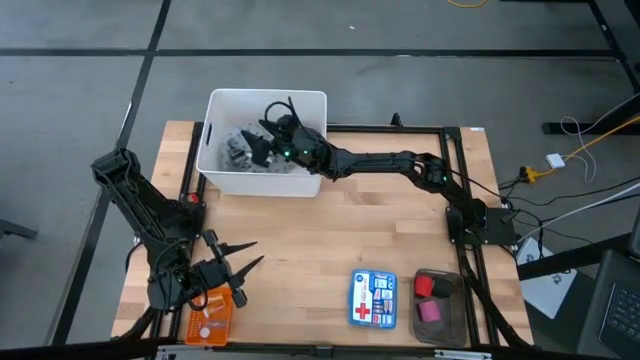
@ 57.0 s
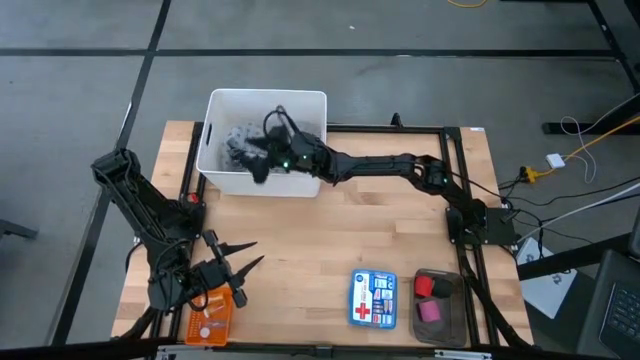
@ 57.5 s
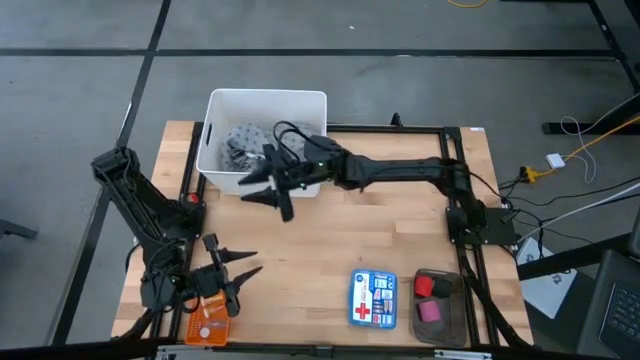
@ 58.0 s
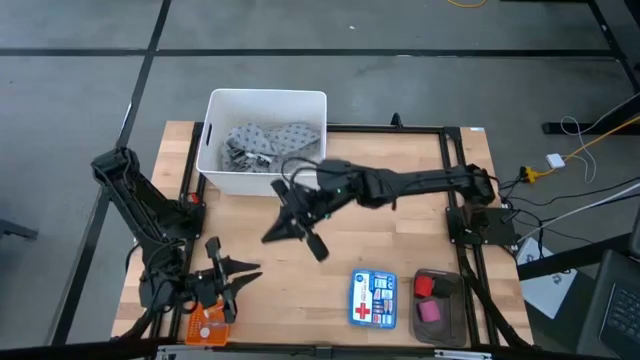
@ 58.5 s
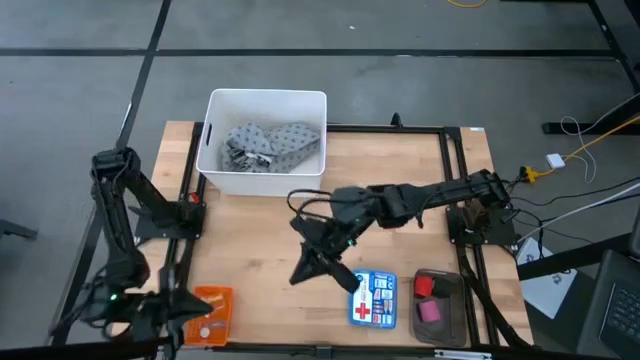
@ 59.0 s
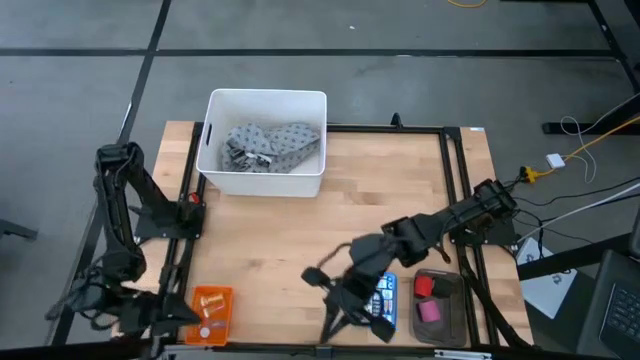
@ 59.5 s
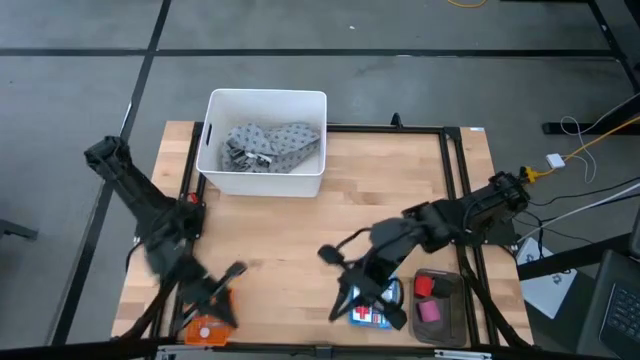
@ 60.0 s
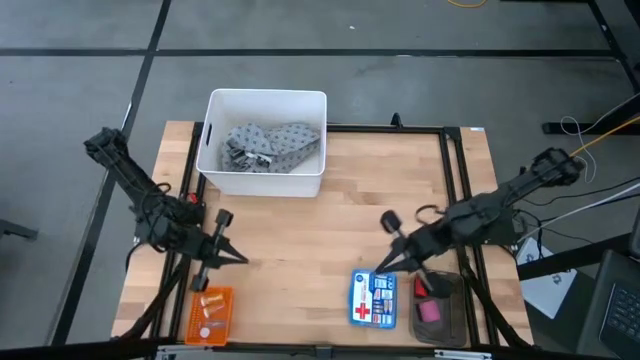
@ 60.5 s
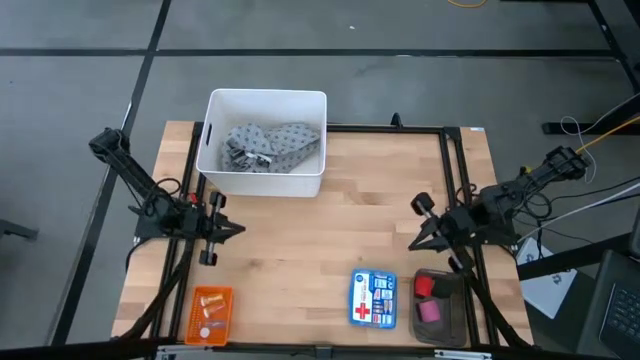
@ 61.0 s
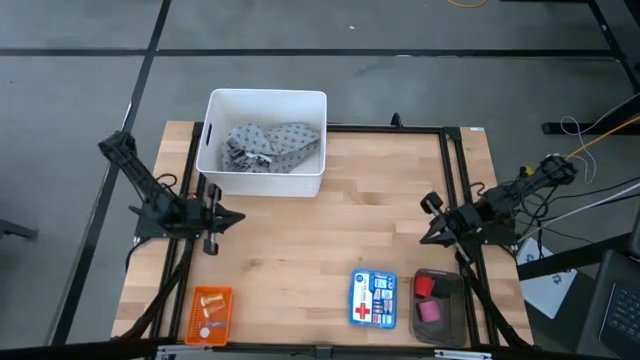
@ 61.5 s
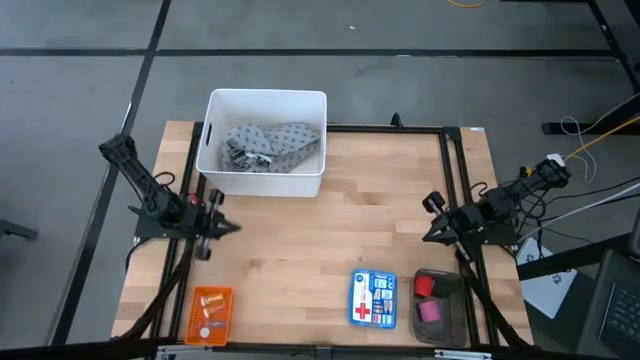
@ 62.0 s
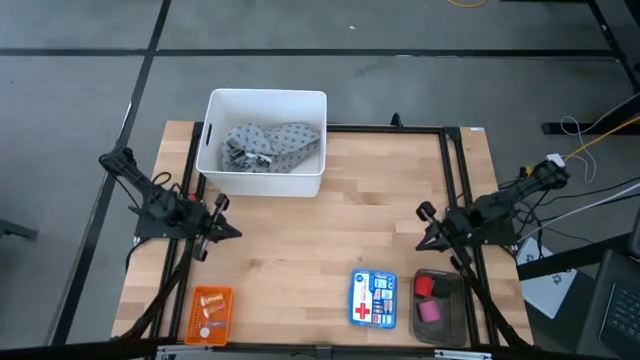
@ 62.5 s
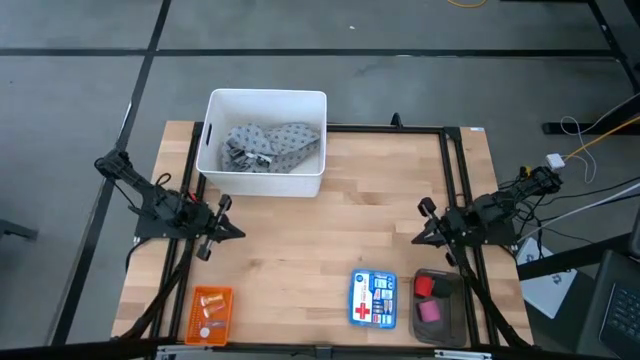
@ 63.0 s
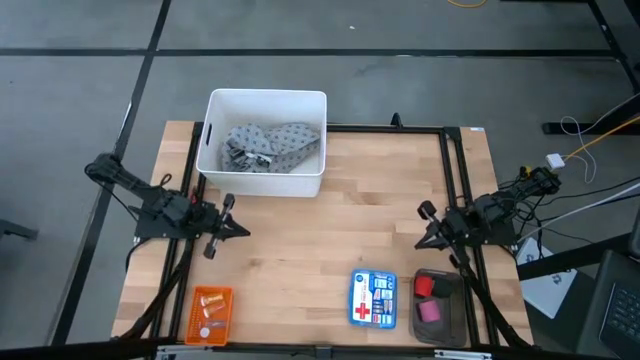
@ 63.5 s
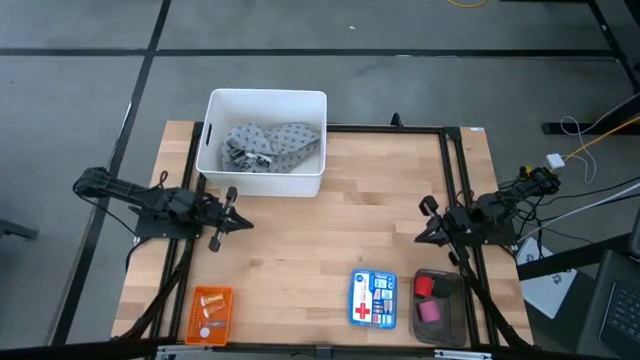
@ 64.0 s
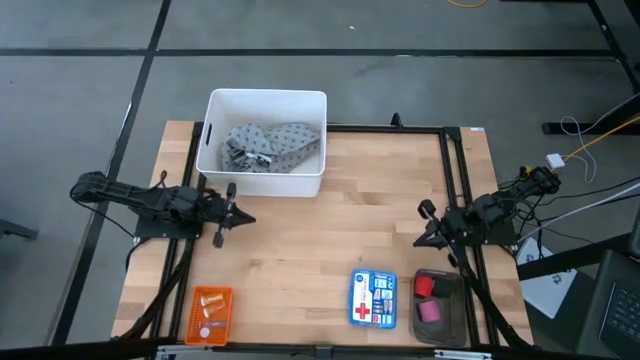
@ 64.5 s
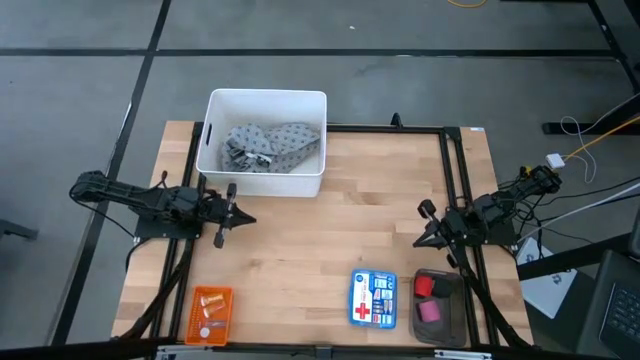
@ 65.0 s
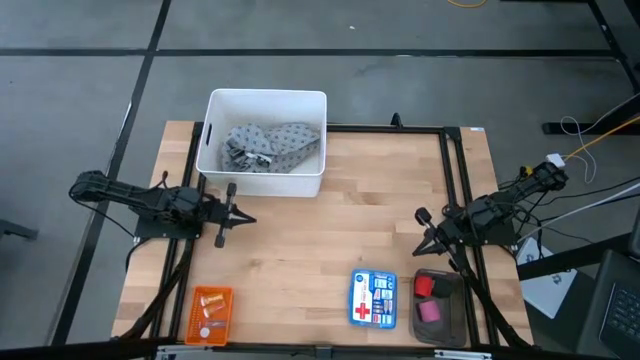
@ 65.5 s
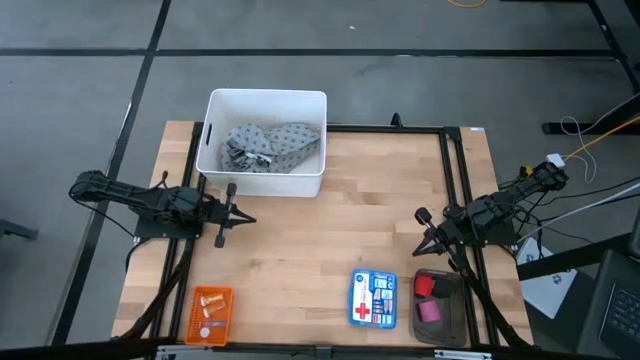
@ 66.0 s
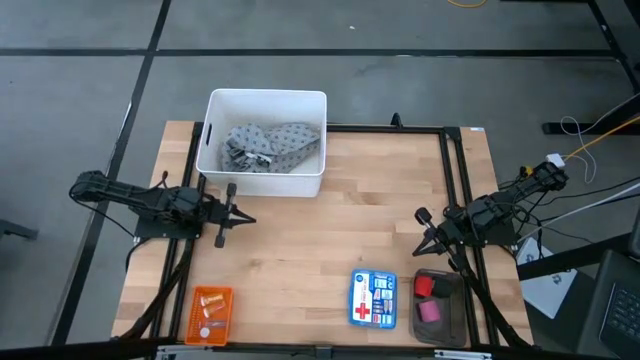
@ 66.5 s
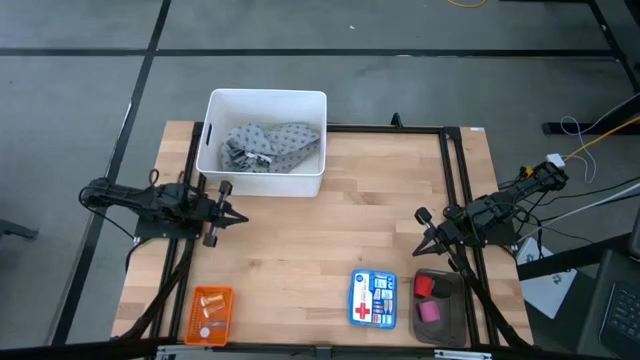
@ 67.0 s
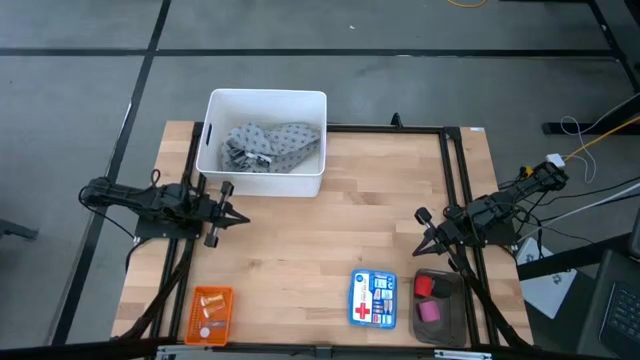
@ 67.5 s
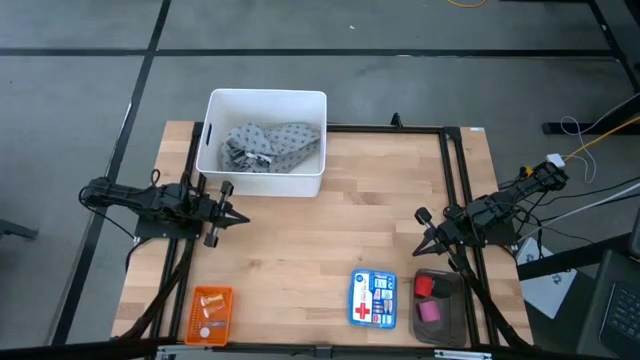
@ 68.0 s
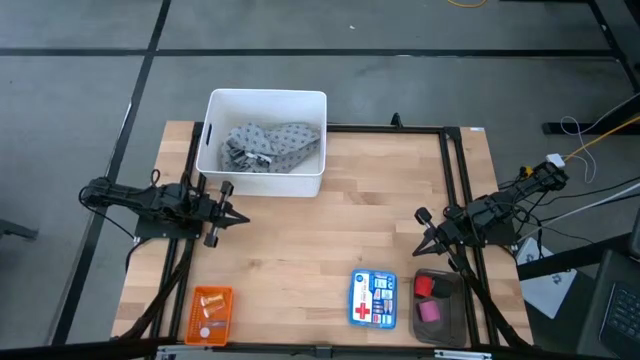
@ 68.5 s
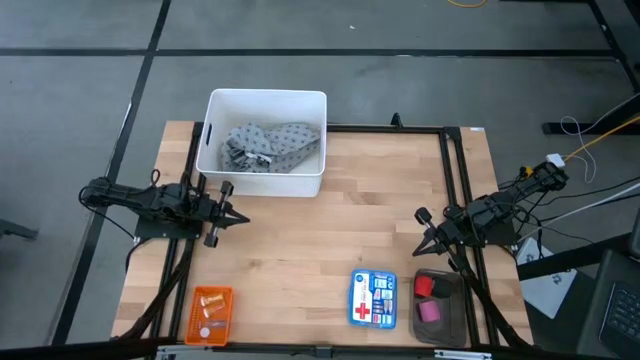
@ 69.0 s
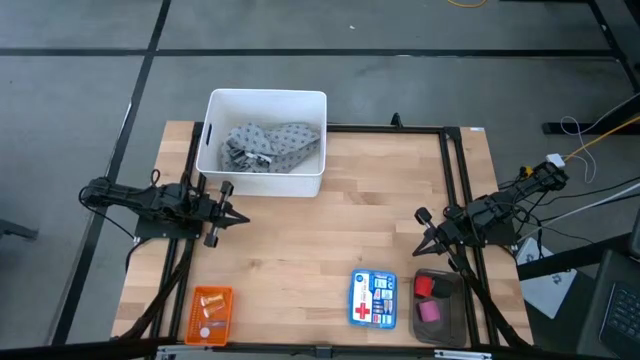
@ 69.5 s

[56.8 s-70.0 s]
Task: Pick & place medical supplies in basket/bin
Return to Home Position

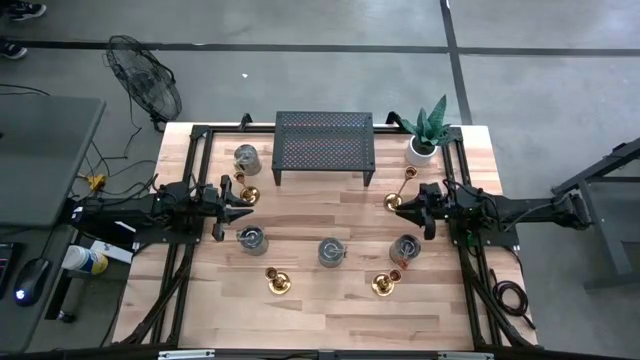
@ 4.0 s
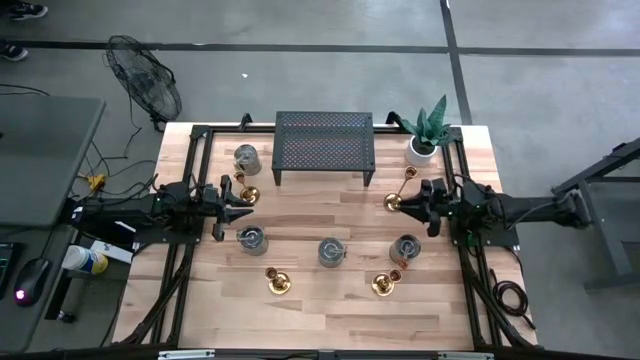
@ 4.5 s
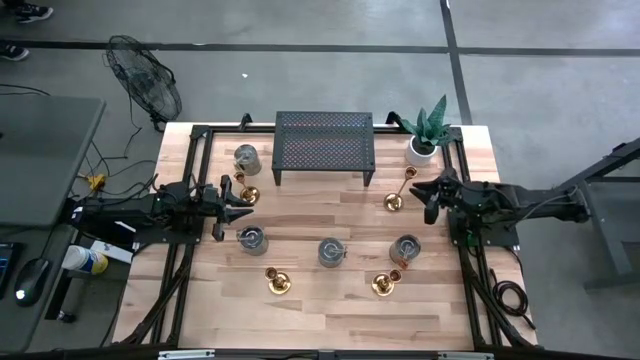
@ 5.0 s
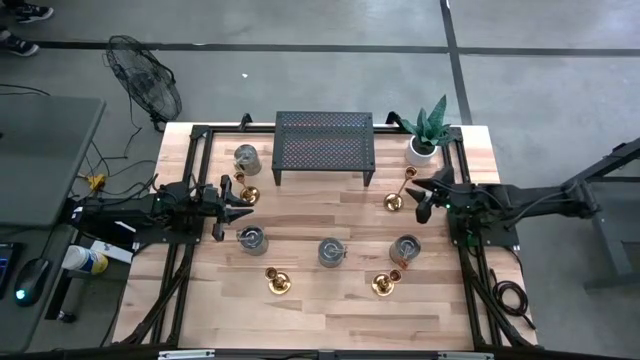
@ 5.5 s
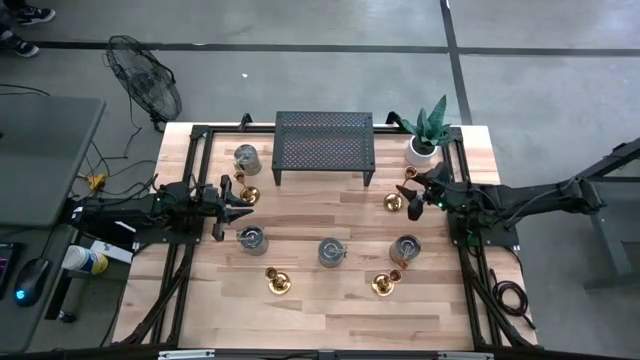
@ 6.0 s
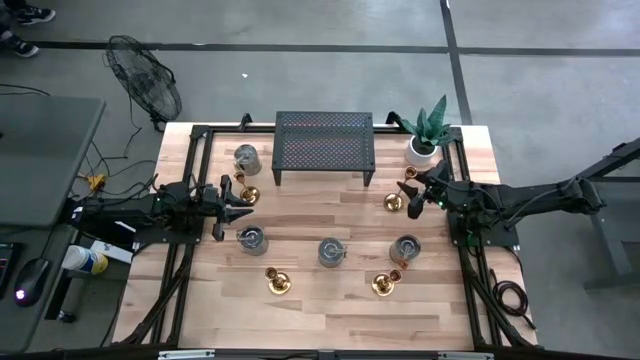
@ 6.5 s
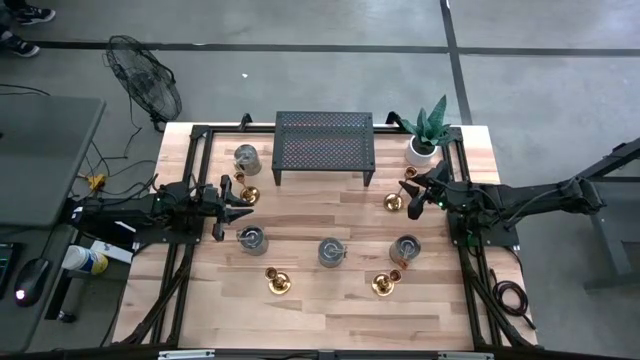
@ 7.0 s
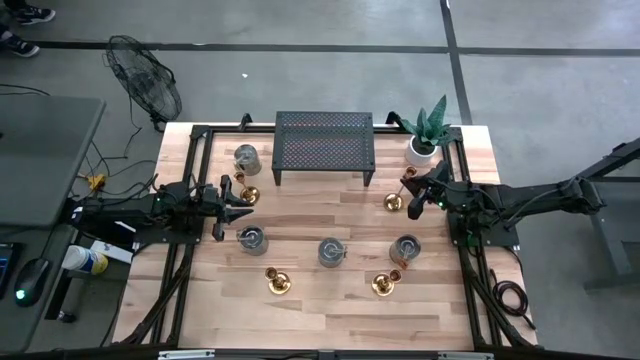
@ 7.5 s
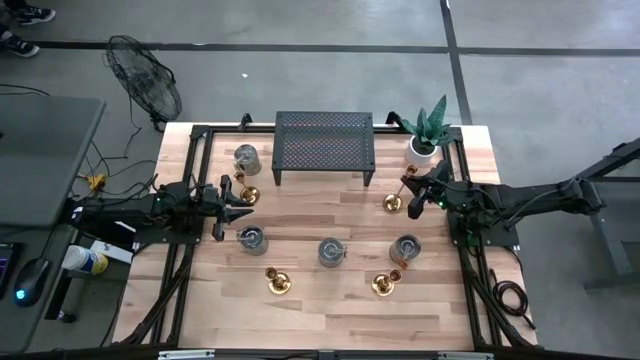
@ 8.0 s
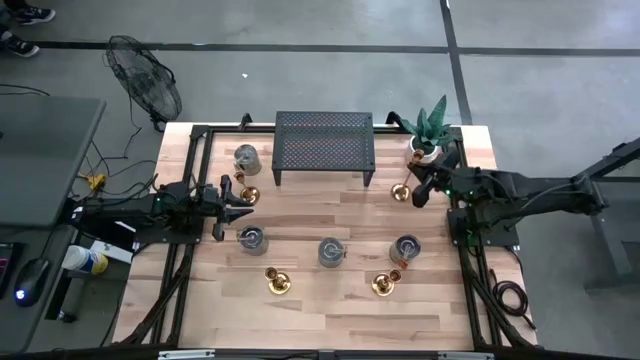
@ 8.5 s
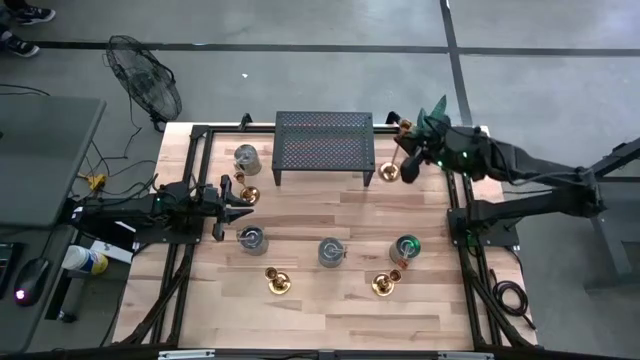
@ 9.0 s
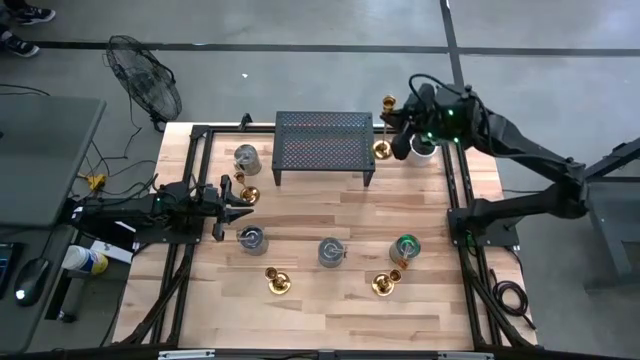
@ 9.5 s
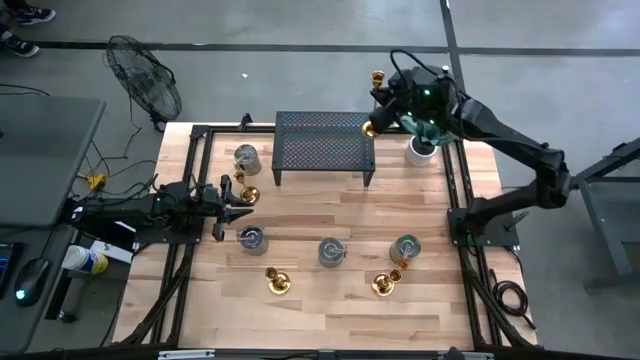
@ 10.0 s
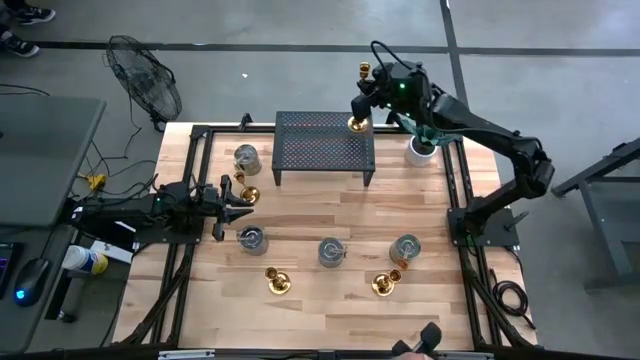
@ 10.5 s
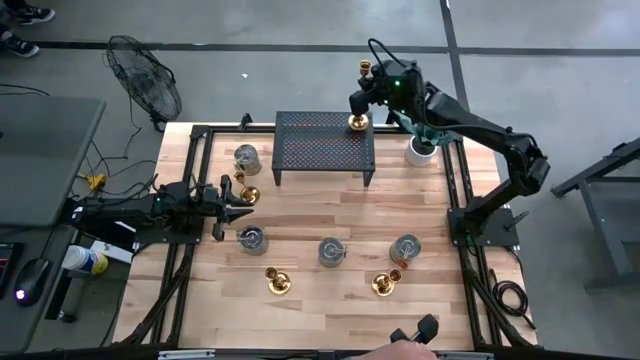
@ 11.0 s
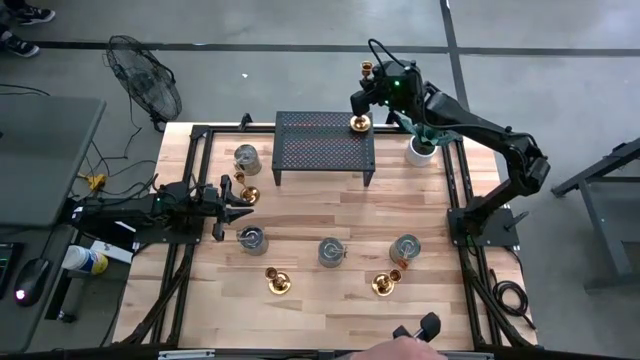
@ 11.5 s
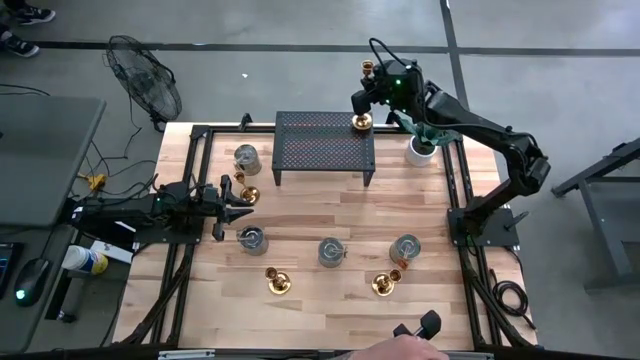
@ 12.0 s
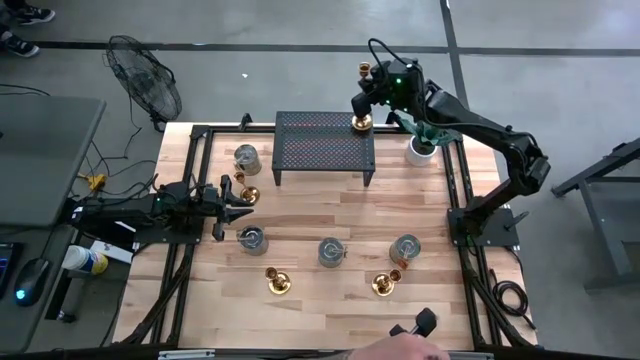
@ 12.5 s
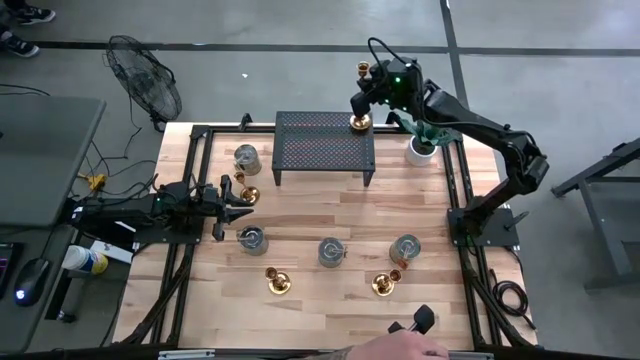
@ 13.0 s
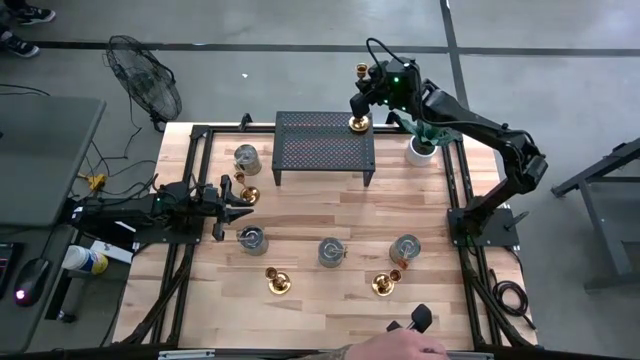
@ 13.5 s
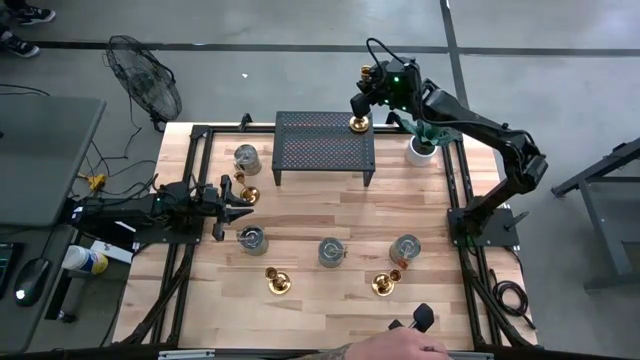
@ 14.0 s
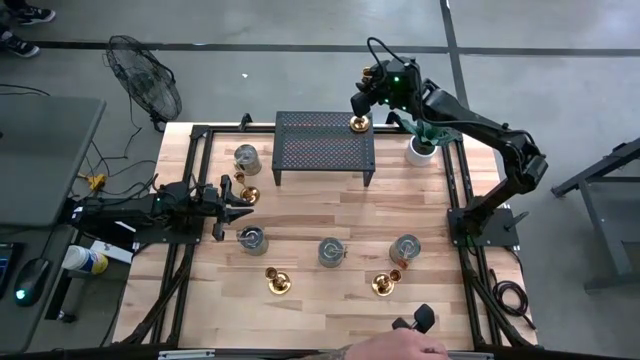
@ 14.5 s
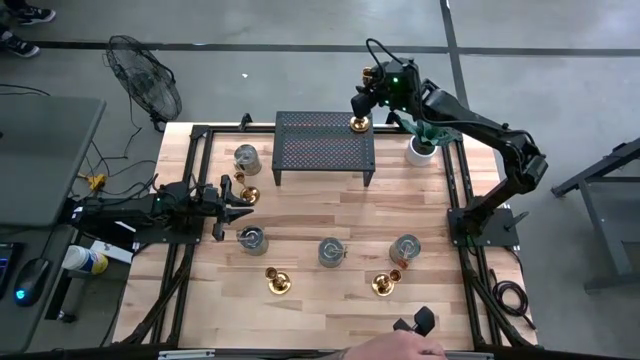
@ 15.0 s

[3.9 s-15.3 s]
Task: Pick & Place candle stick holders
Put the gold candle holder on the shelf
